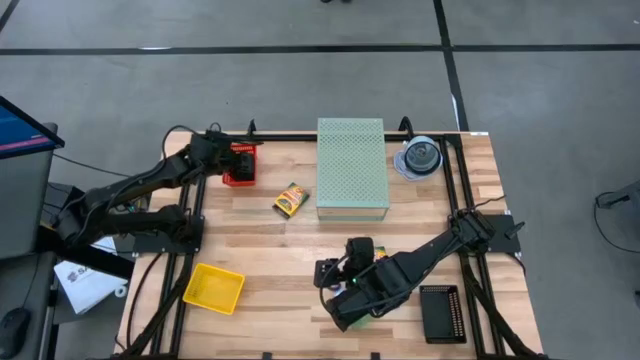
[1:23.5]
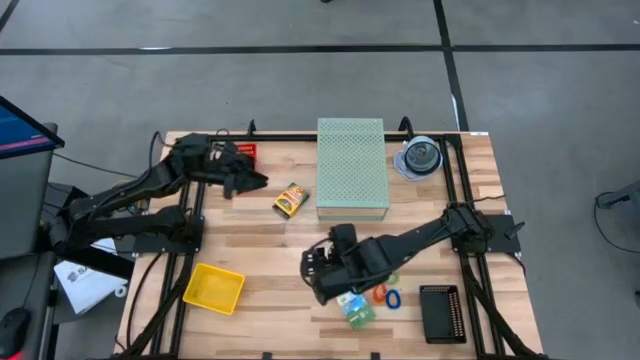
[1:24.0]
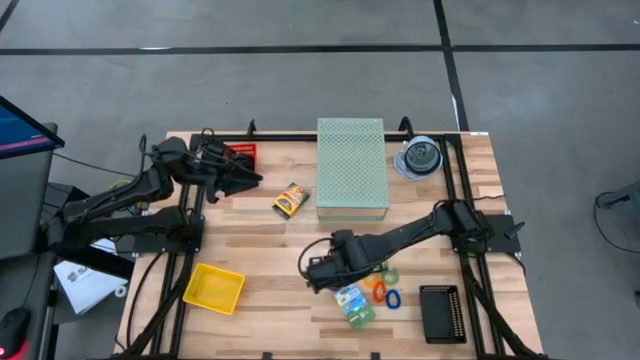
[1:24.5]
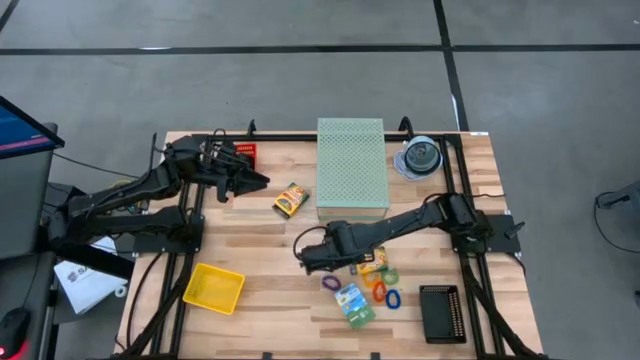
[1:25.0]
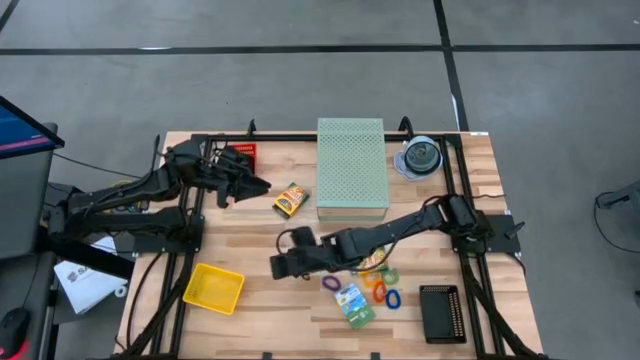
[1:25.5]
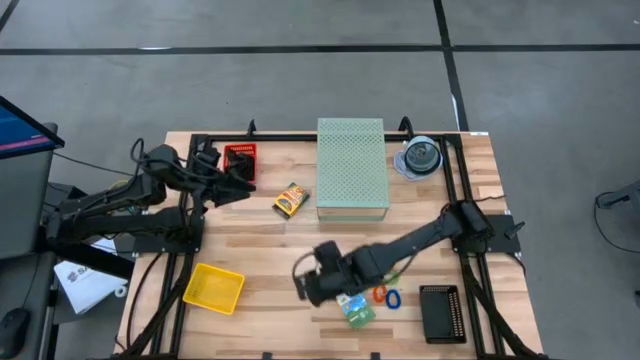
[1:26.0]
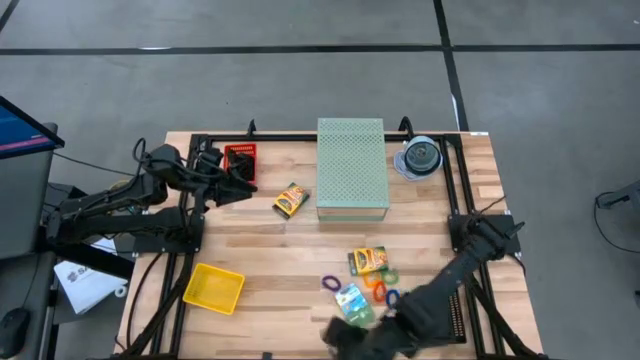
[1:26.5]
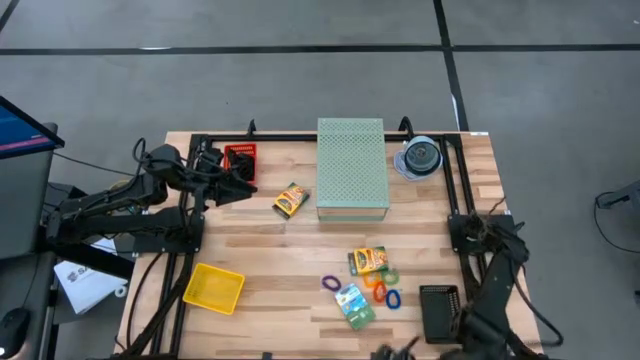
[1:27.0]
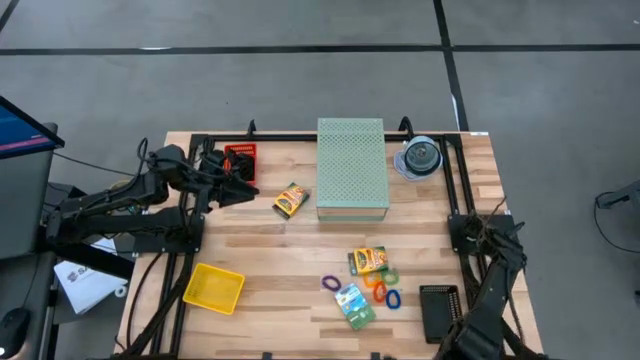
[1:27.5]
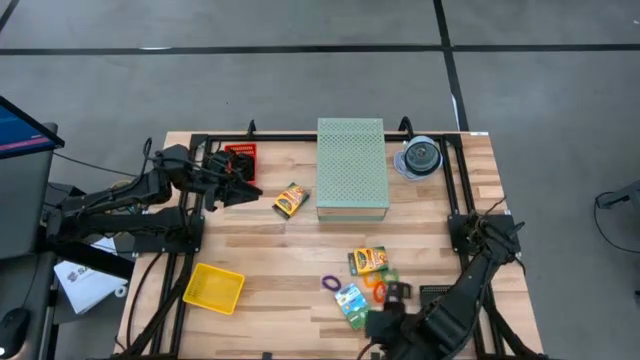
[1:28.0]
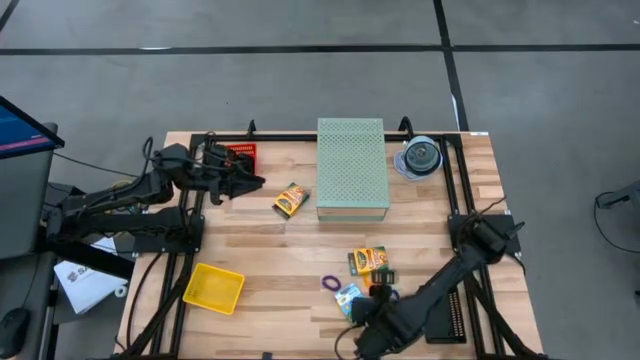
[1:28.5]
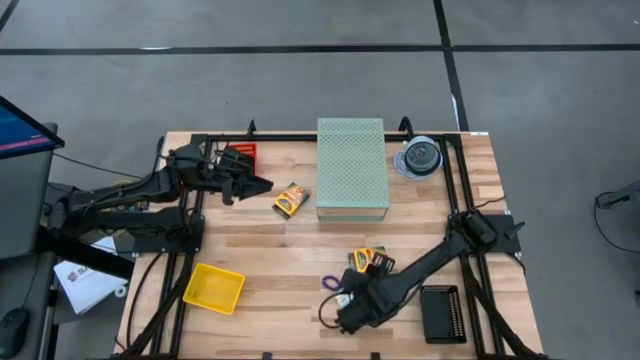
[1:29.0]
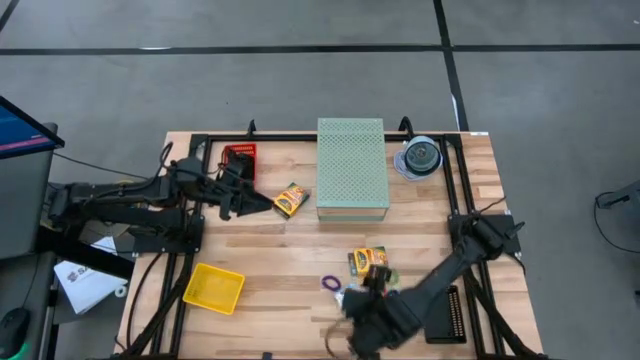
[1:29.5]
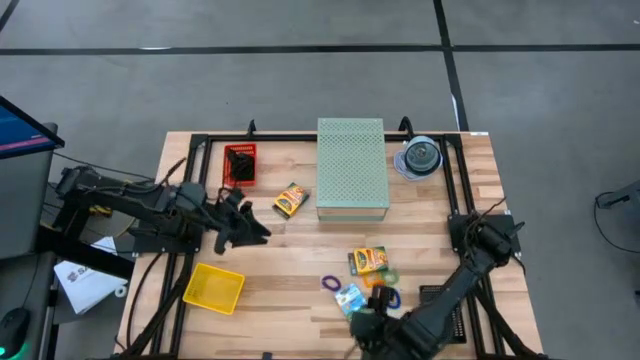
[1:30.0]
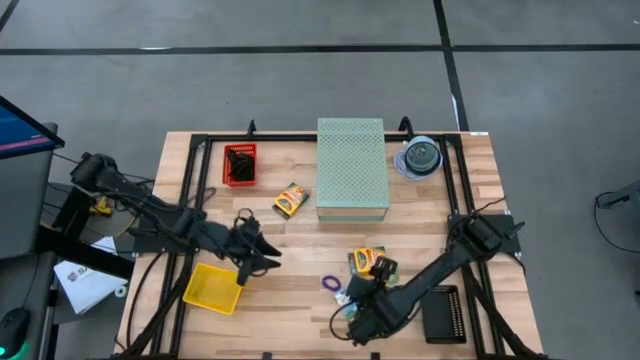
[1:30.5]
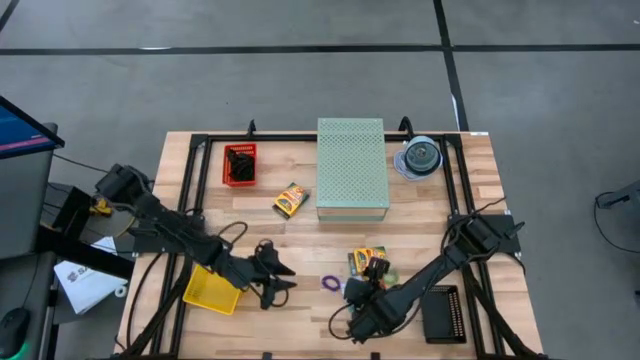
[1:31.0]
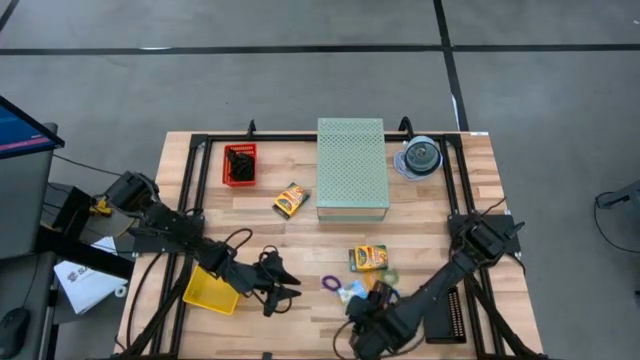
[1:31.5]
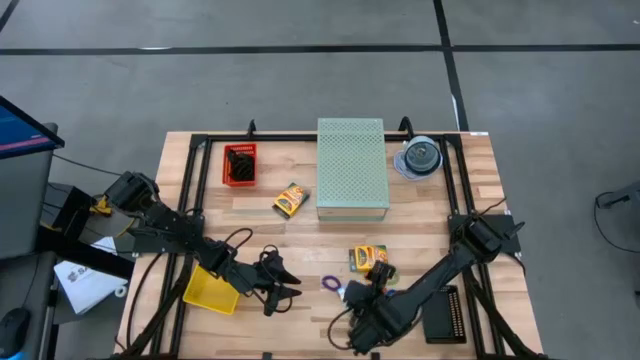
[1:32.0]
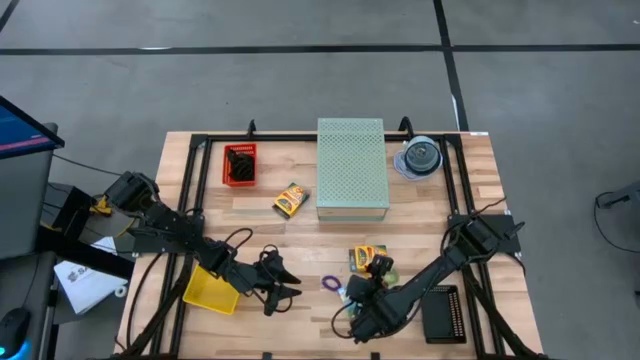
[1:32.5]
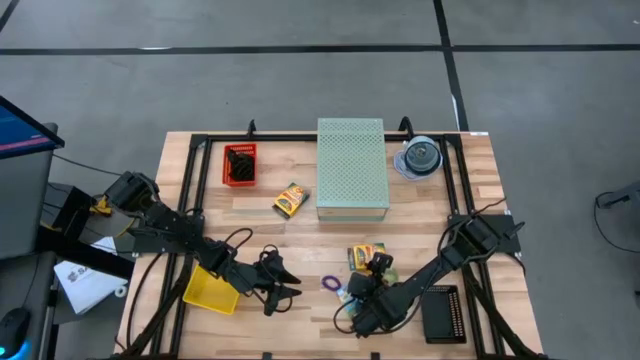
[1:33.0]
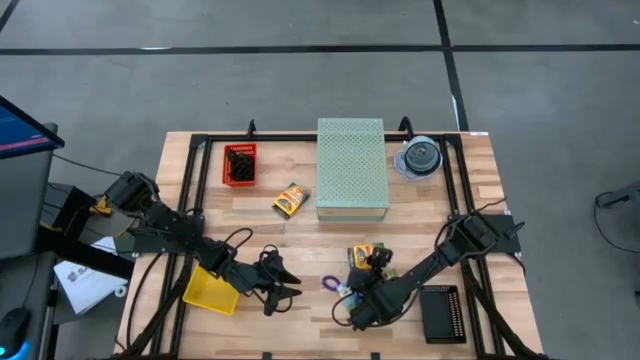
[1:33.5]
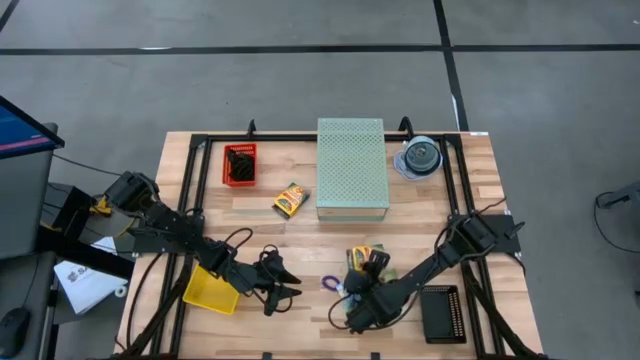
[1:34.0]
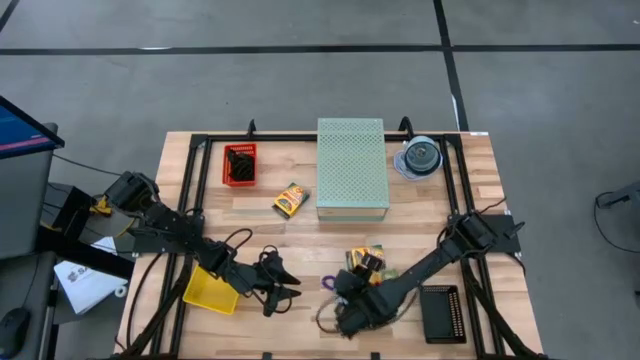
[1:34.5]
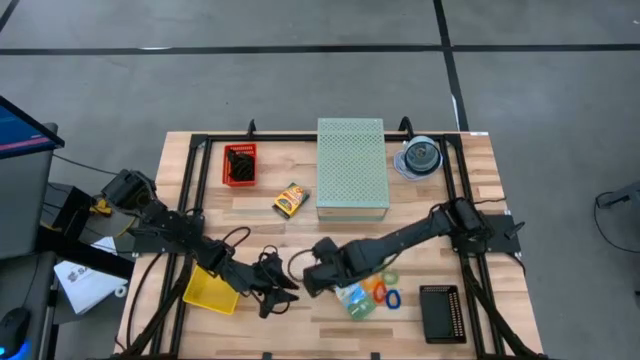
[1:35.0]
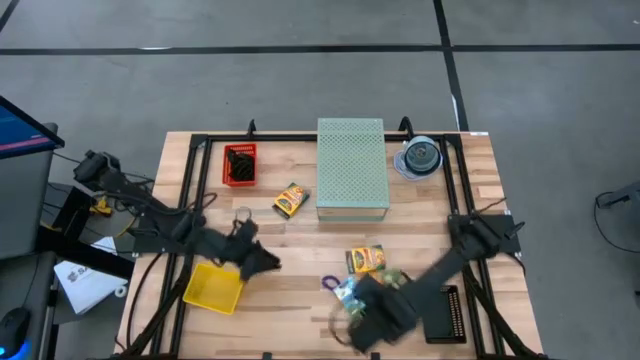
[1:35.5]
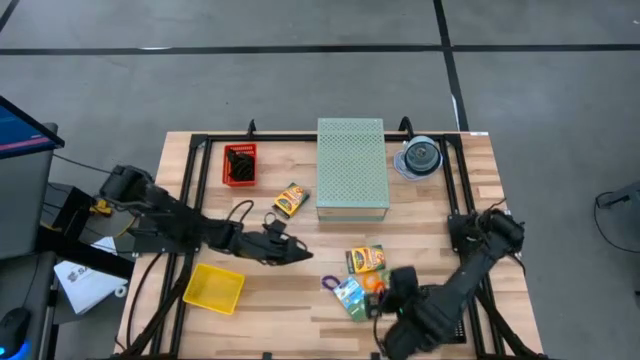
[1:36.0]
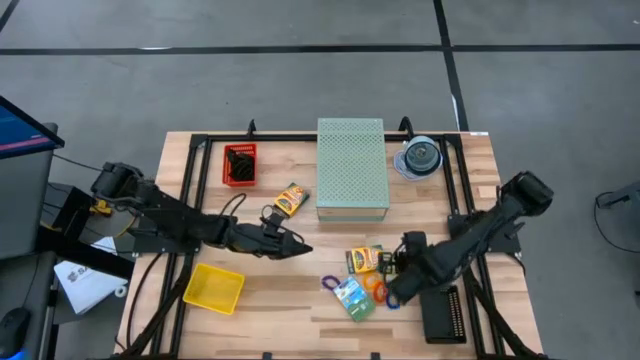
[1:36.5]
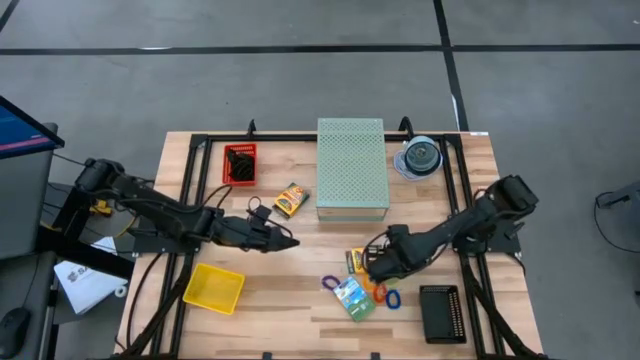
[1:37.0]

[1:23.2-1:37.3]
Task: Pick & Place Office Desk Supplies
Put the crayon box into the yellow bin

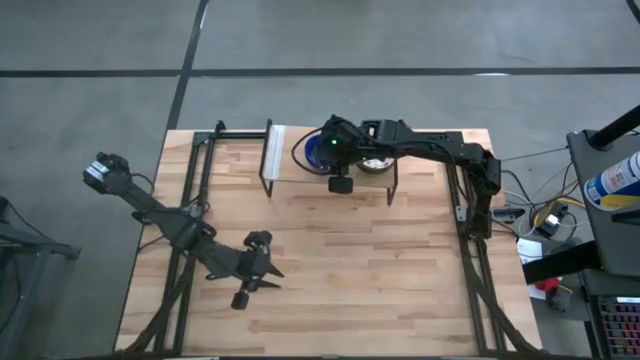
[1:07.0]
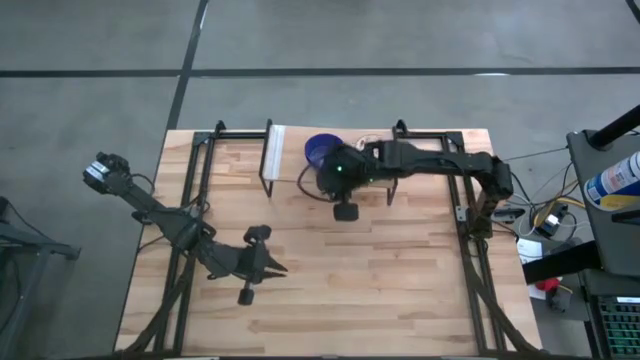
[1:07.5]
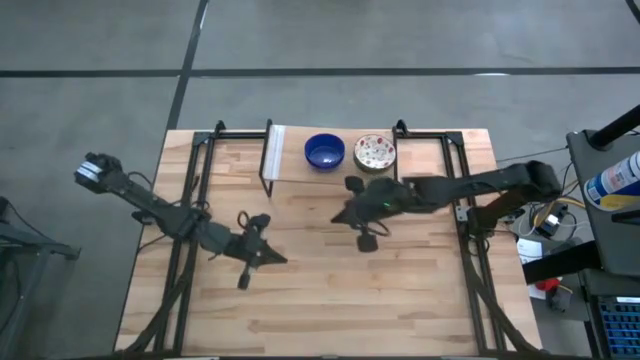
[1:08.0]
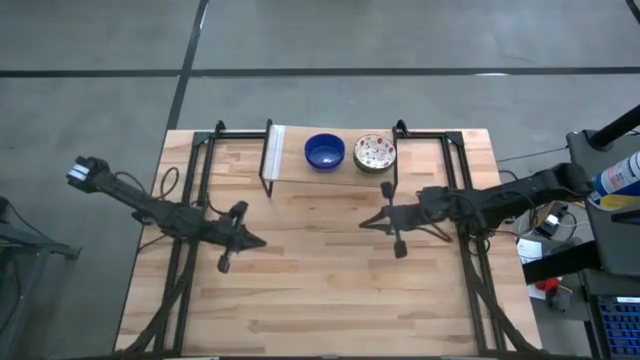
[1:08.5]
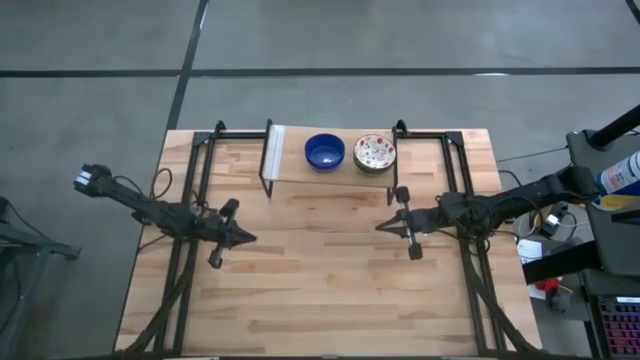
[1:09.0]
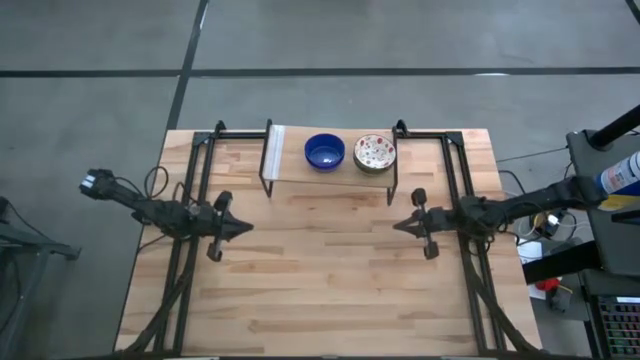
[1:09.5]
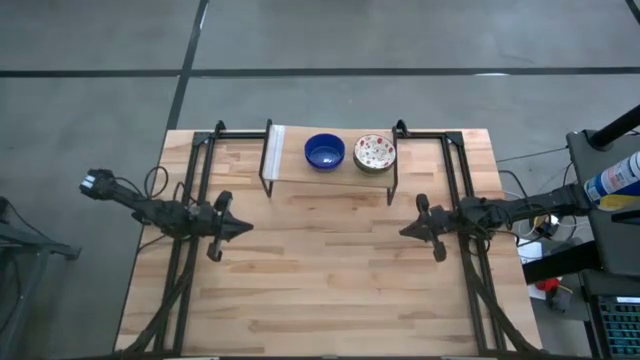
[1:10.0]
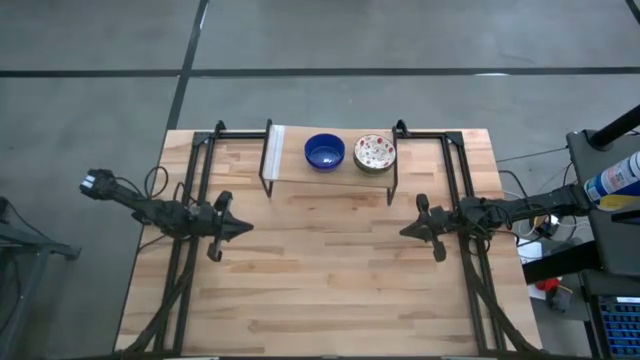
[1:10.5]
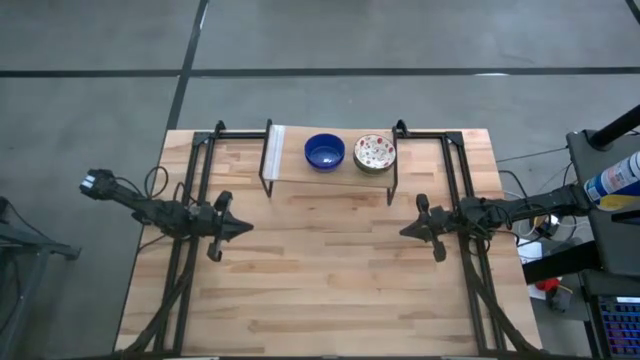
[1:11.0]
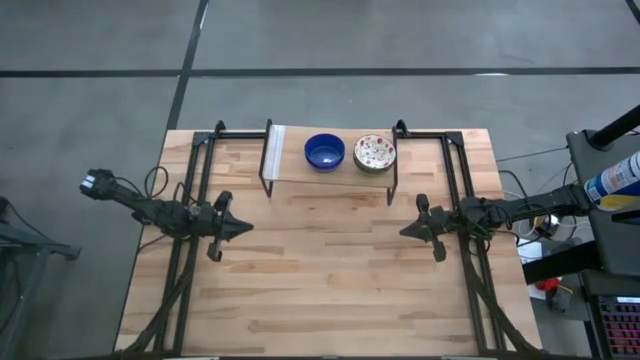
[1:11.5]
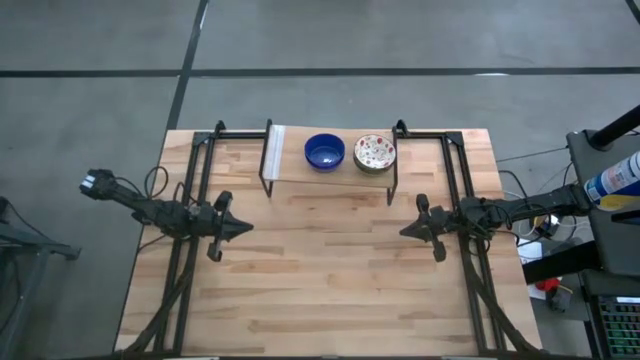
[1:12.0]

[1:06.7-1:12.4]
Task: Pick & Place Mini bowls
Return to Home Position
